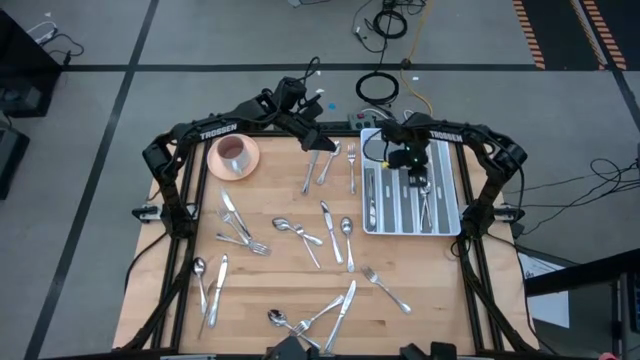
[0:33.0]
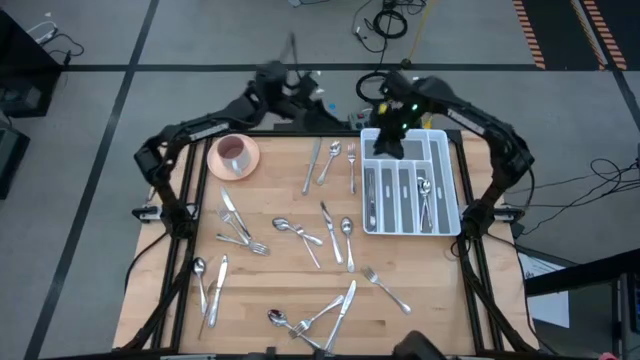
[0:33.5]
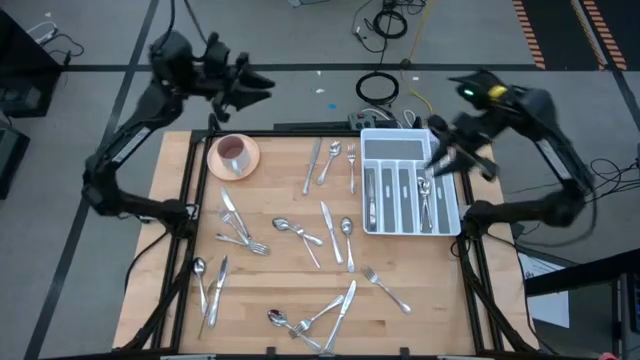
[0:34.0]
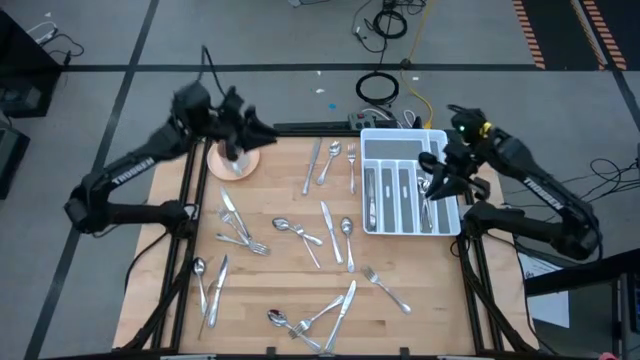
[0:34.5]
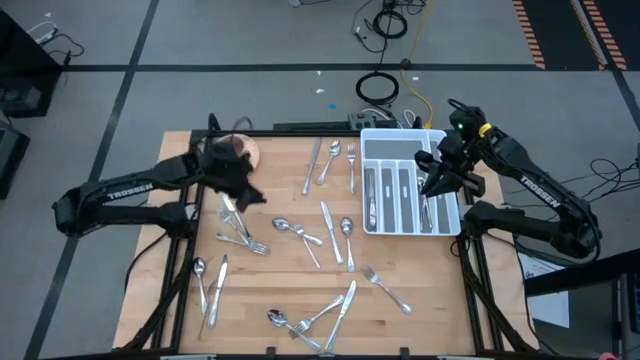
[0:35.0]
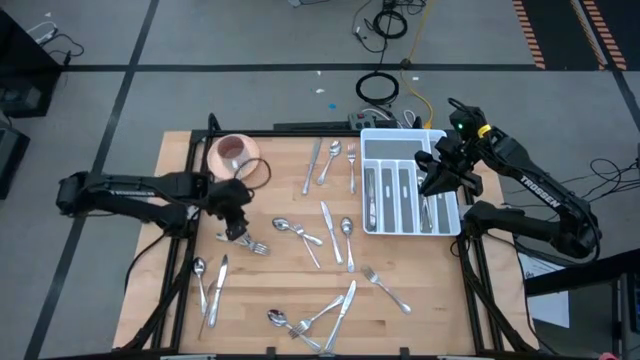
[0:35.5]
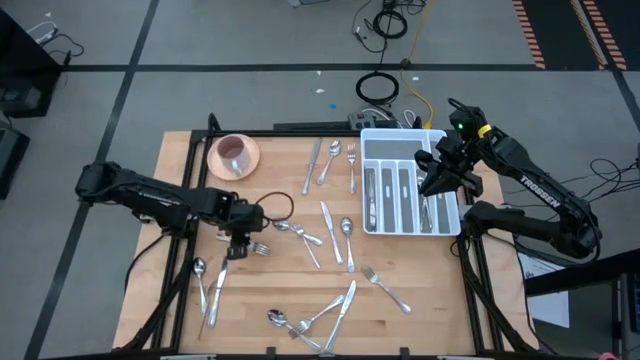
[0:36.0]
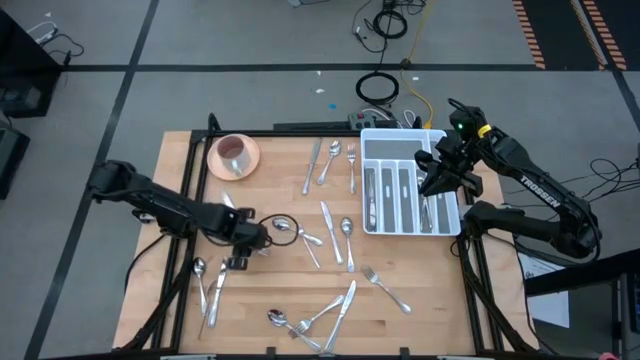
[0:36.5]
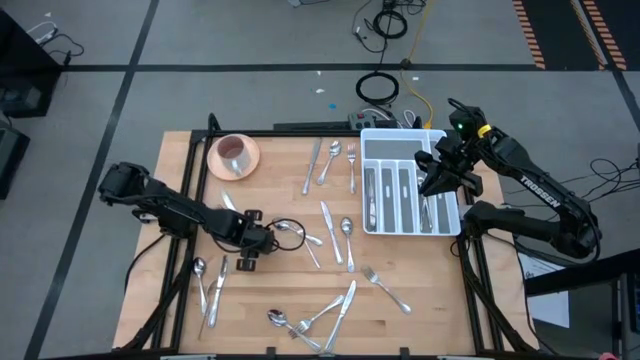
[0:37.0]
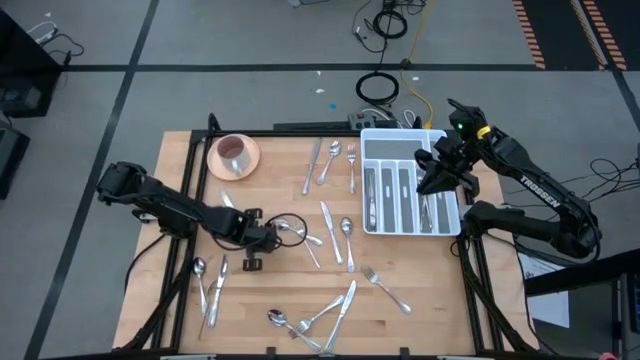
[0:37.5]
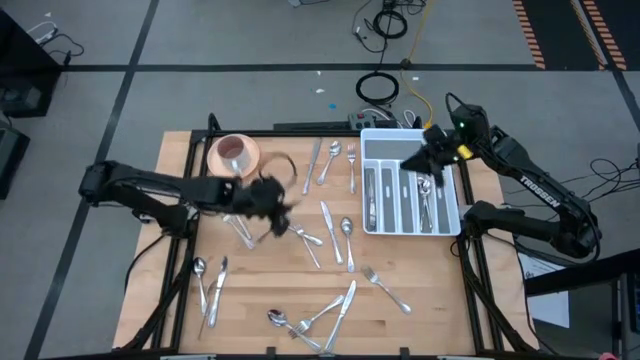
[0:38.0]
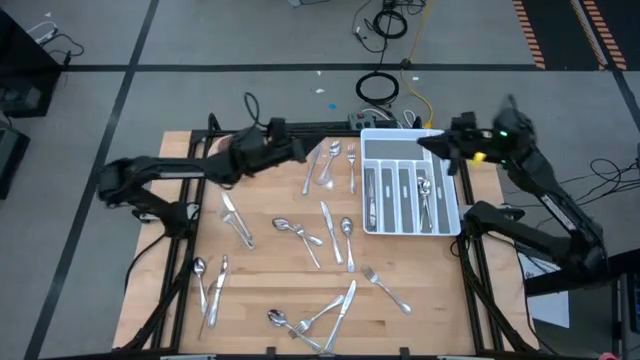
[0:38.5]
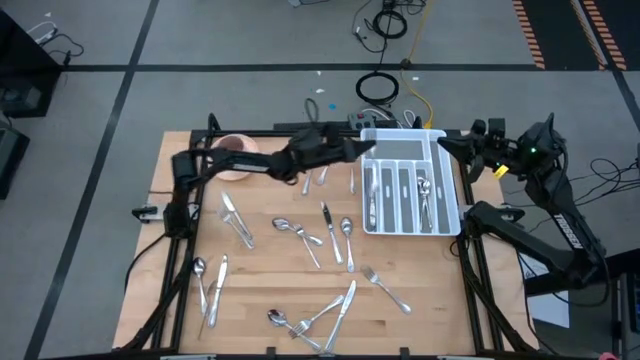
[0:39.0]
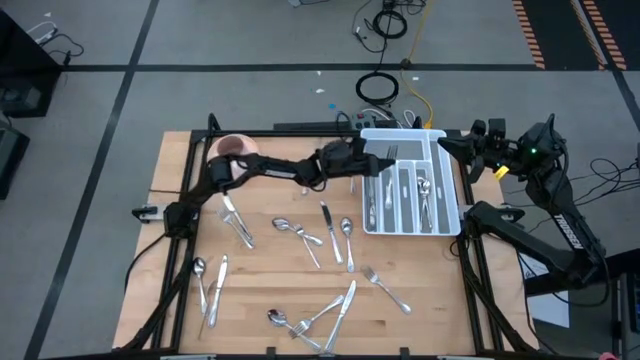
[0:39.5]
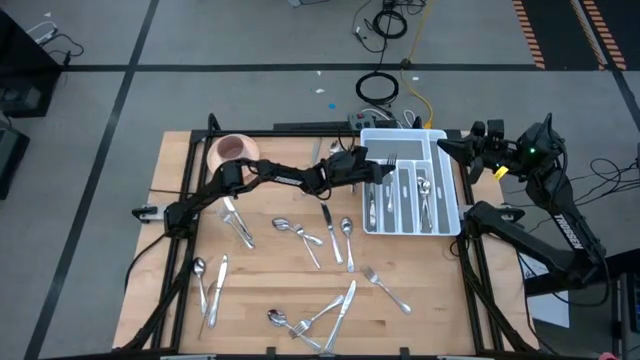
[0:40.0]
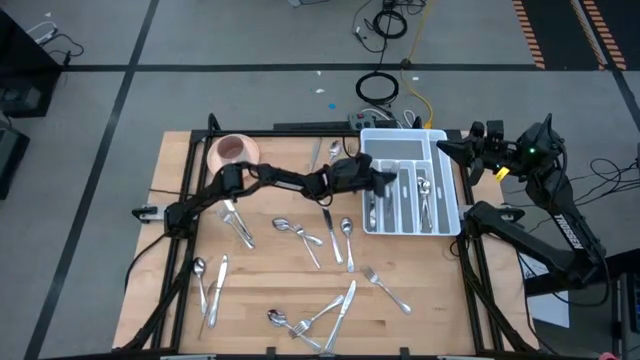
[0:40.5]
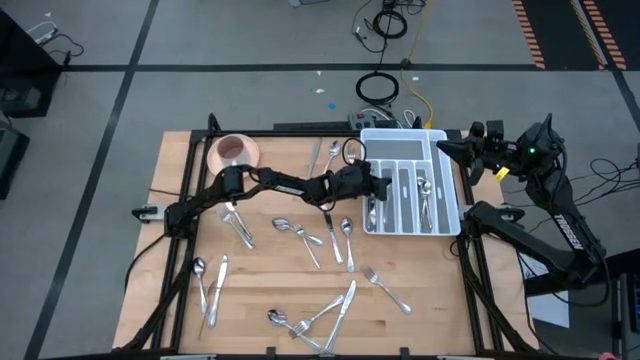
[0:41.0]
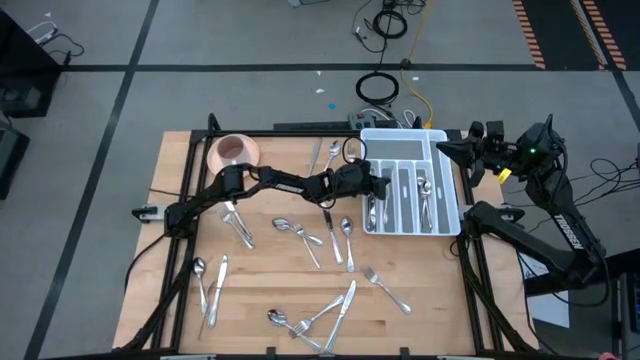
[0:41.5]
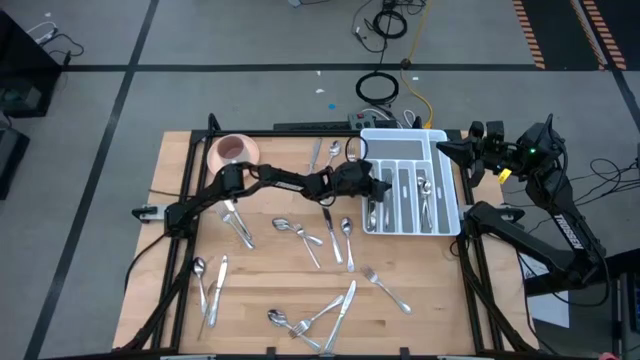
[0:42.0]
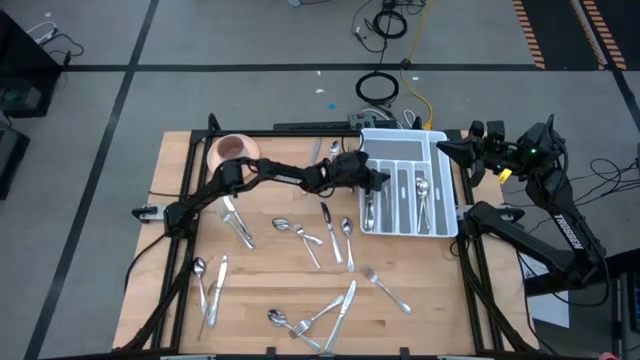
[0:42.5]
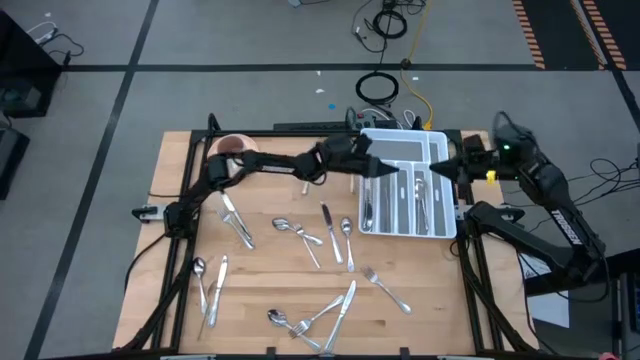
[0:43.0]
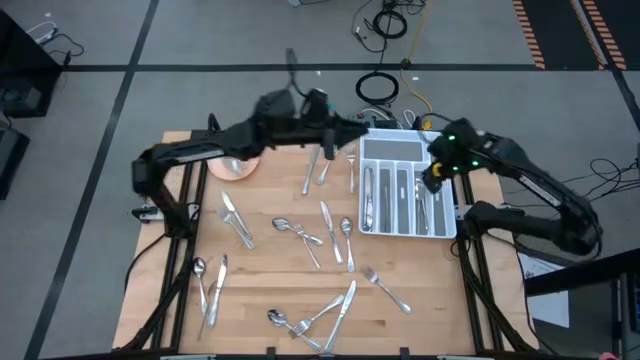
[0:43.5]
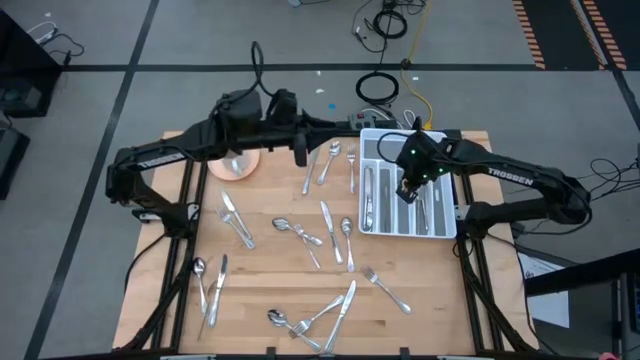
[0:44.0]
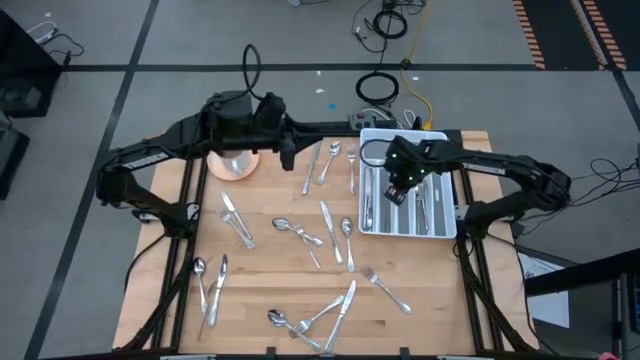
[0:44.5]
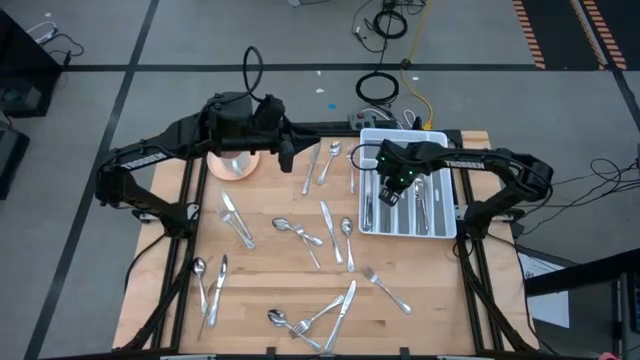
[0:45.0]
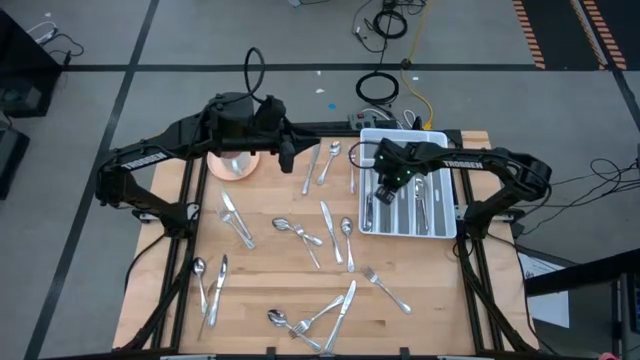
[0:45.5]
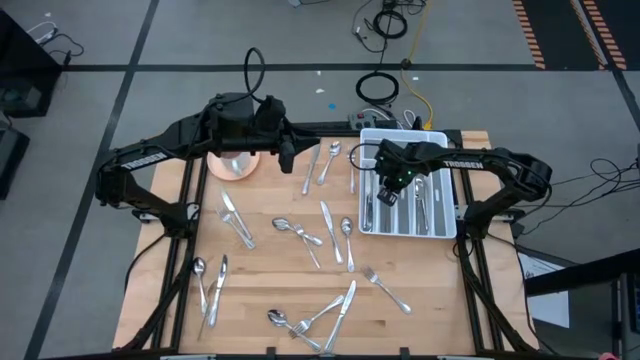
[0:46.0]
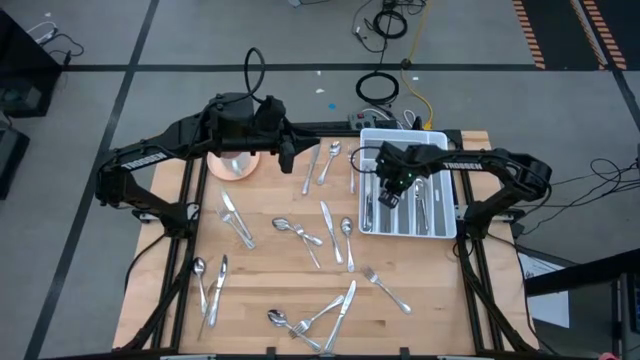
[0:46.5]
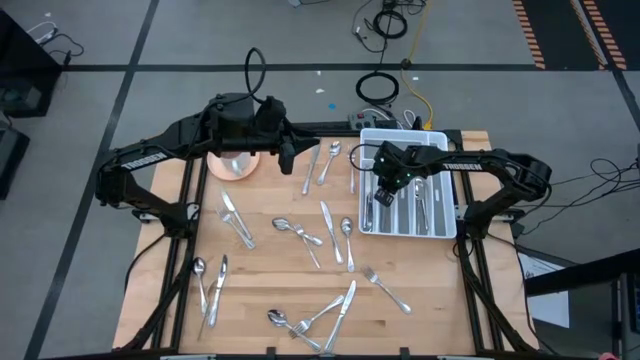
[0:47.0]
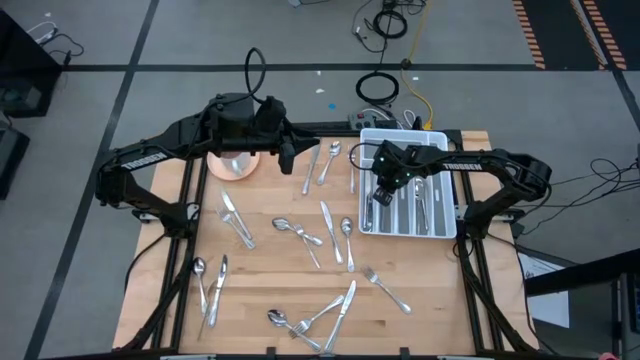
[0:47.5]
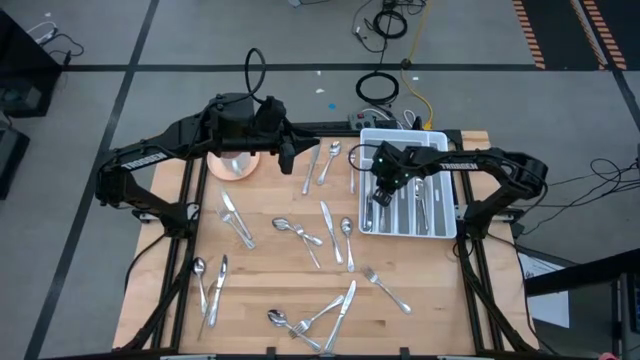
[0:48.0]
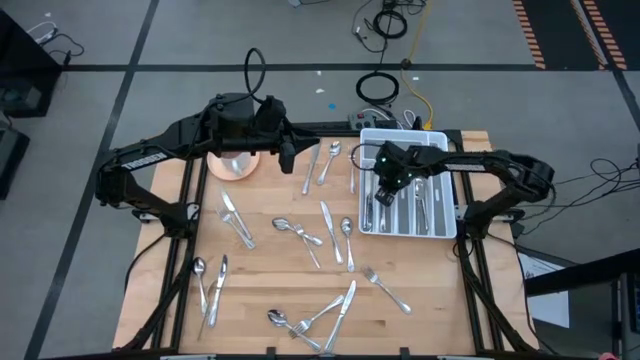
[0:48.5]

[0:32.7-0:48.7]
Task: Sort silverware
Put the silver fork into the silverware rack

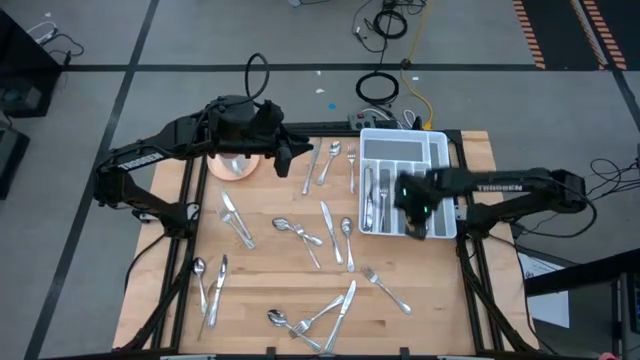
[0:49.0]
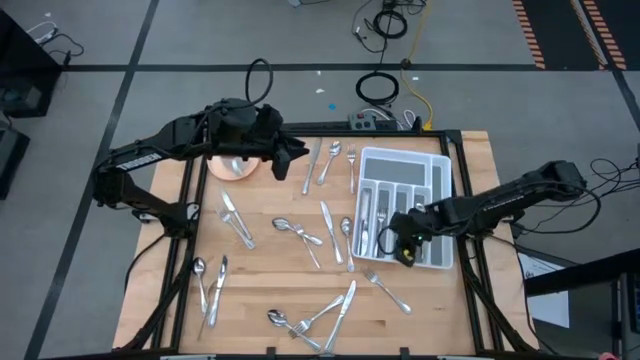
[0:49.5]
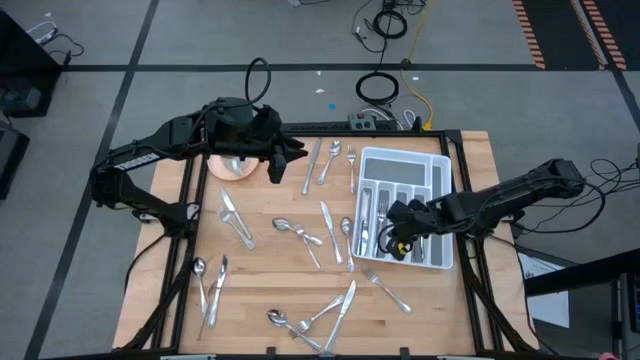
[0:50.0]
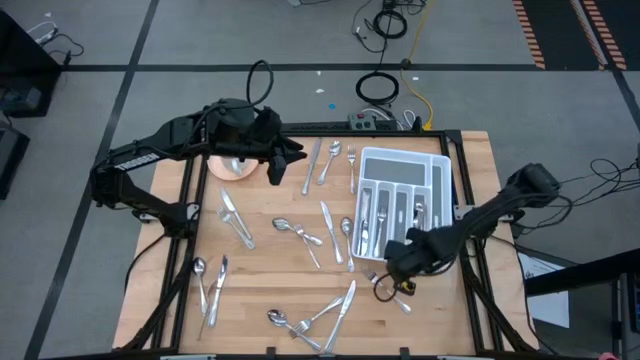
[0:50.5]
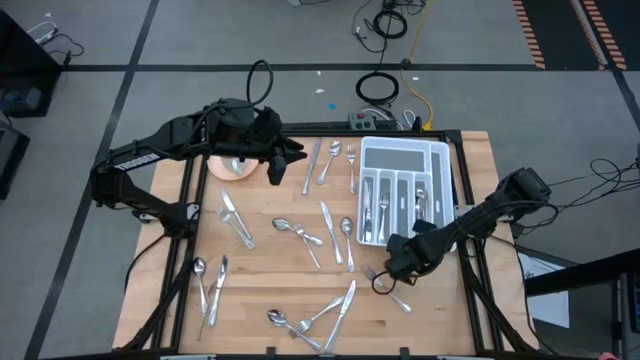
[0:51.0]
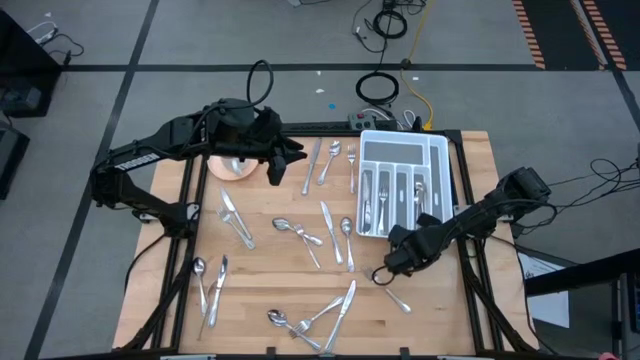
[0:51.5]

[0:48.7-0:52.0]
Adjust the silverware rack
